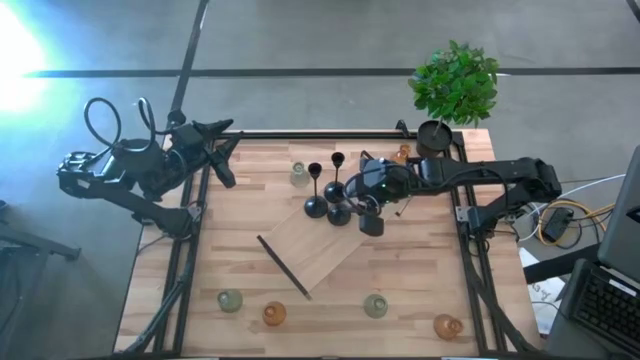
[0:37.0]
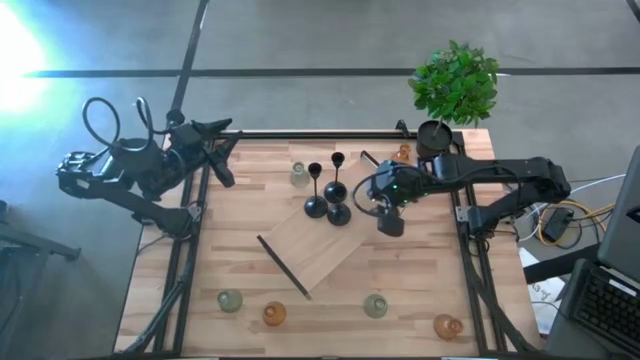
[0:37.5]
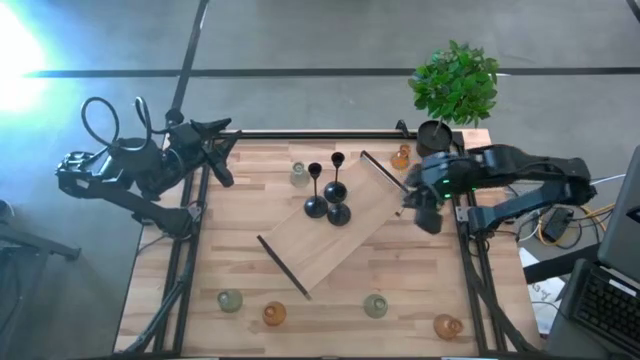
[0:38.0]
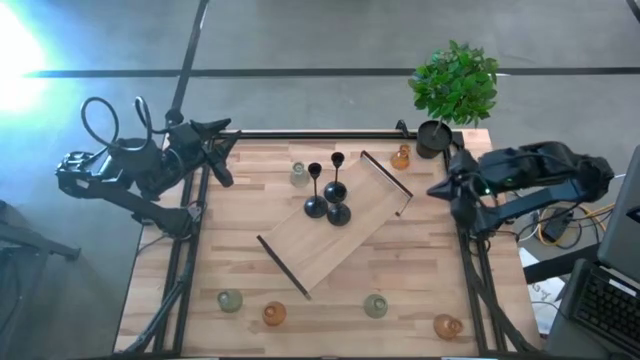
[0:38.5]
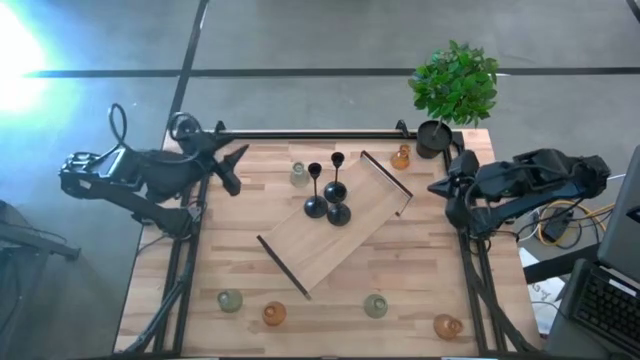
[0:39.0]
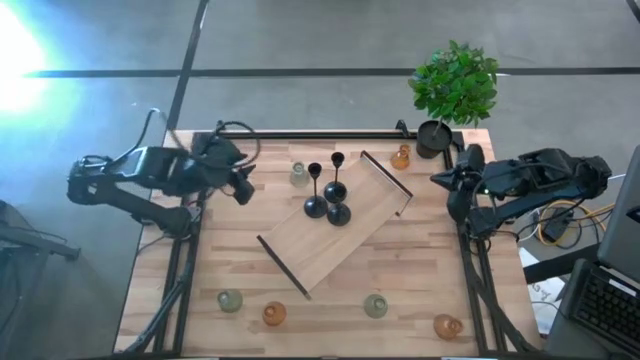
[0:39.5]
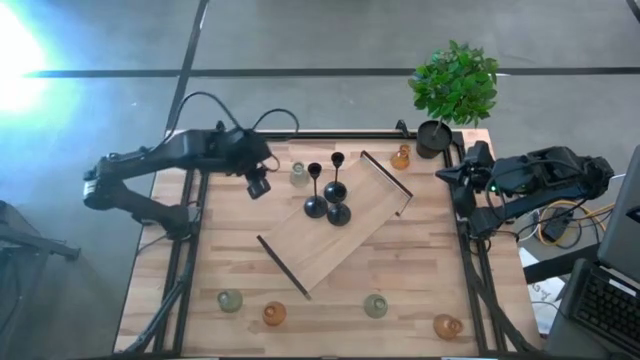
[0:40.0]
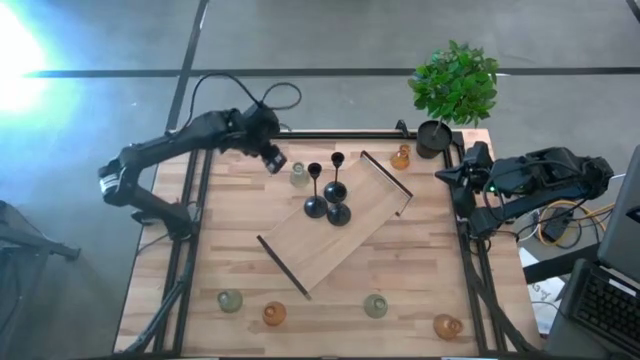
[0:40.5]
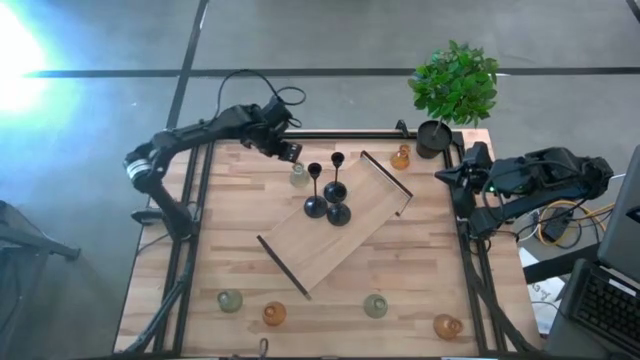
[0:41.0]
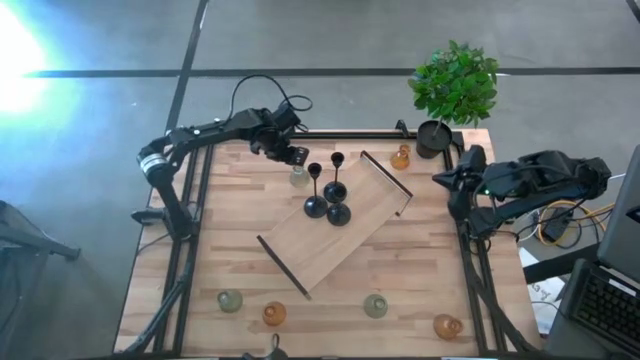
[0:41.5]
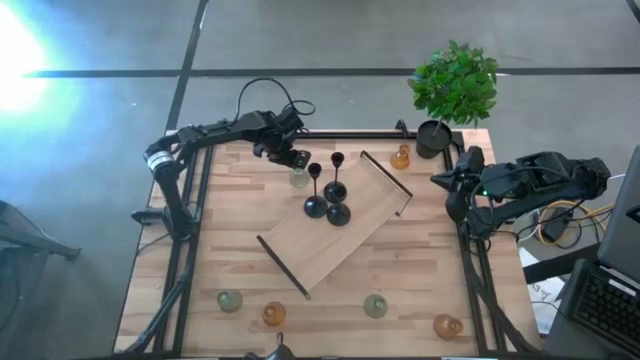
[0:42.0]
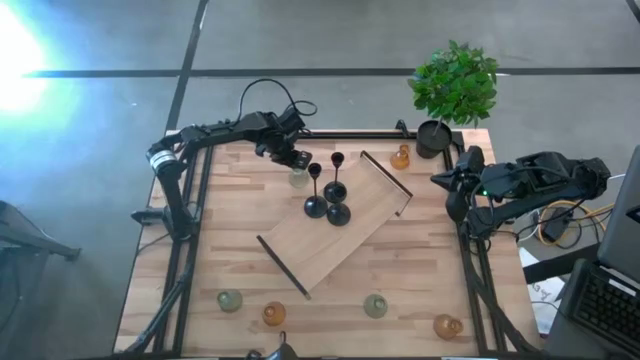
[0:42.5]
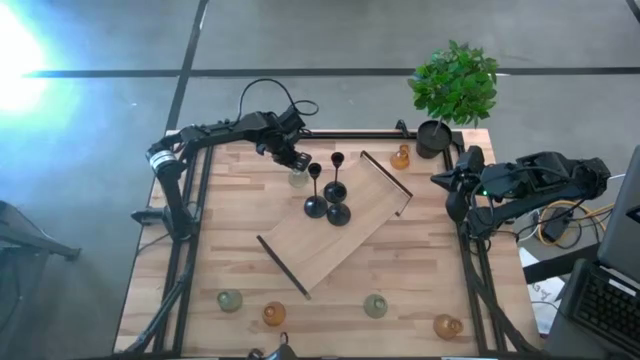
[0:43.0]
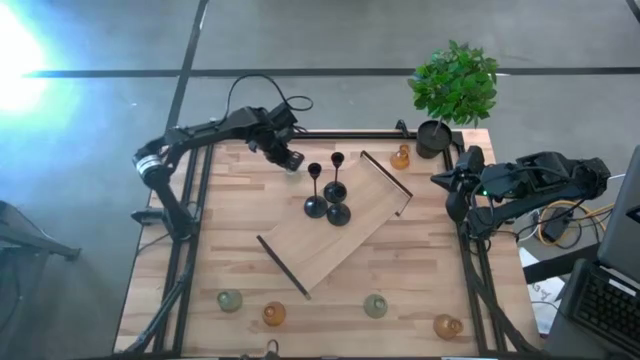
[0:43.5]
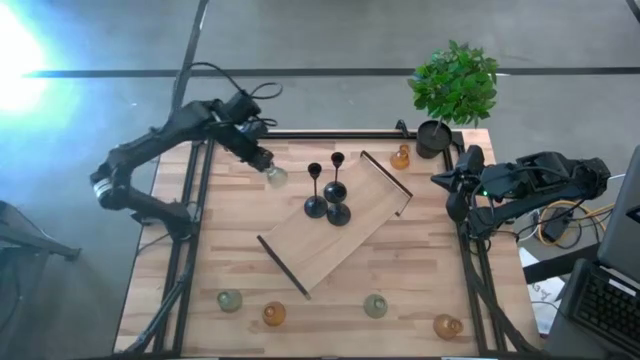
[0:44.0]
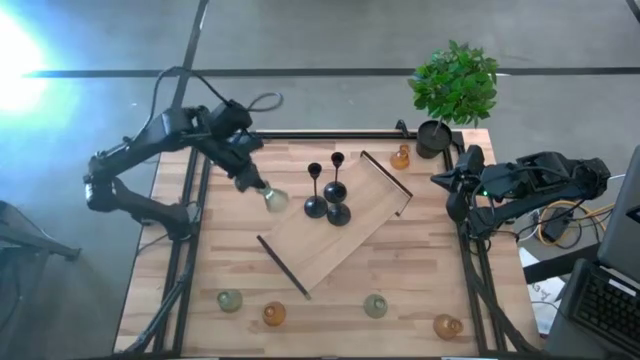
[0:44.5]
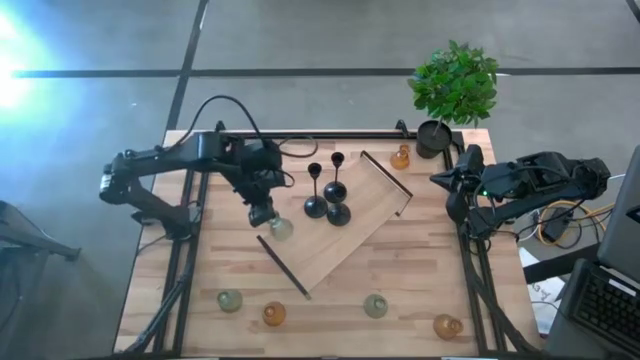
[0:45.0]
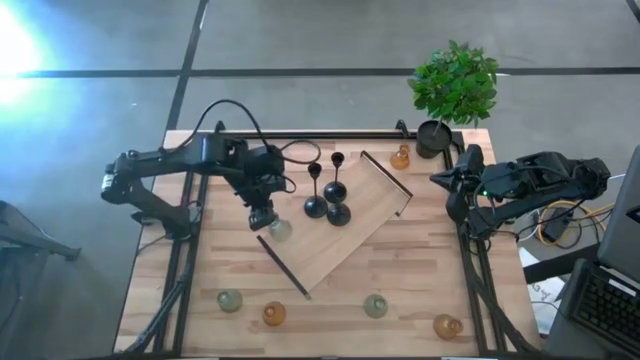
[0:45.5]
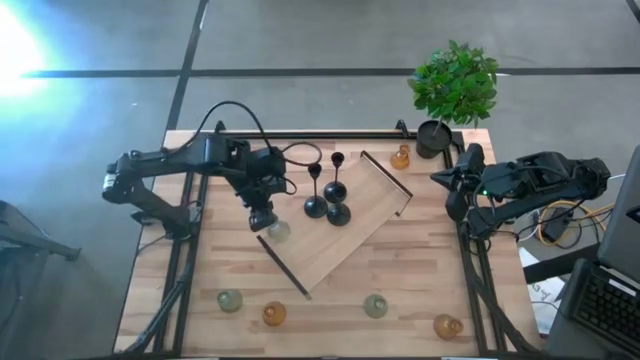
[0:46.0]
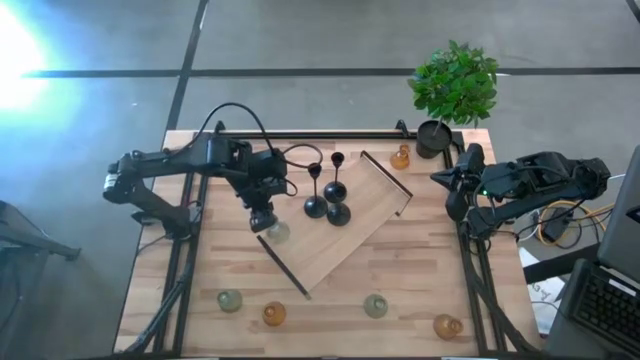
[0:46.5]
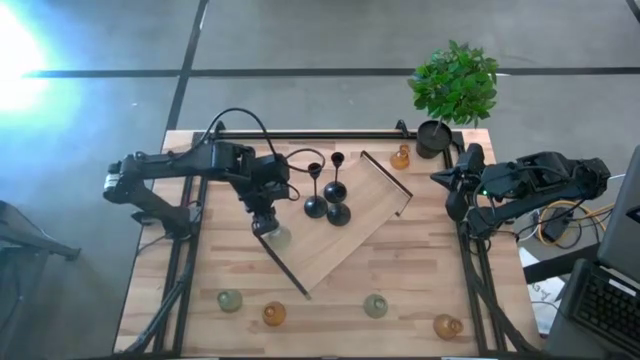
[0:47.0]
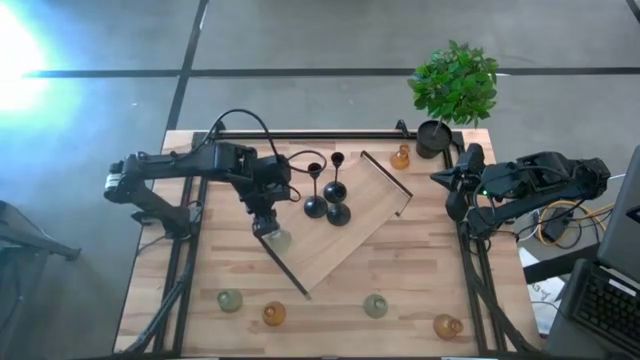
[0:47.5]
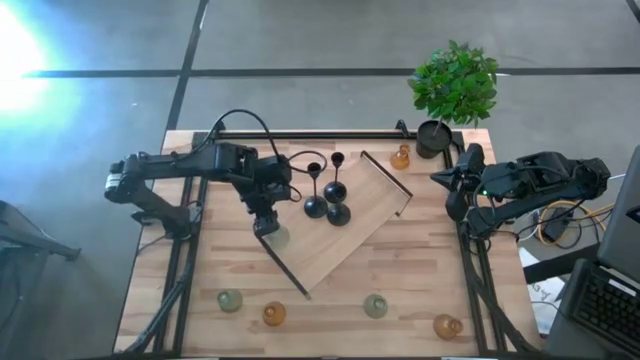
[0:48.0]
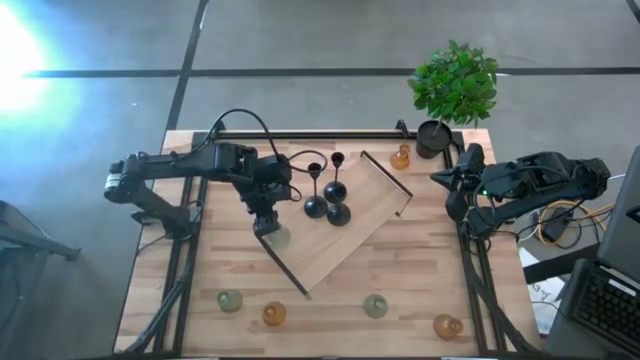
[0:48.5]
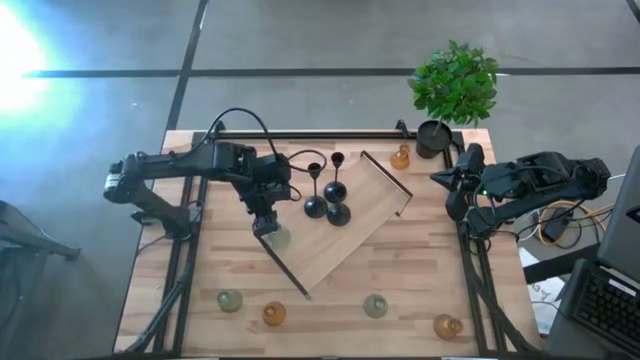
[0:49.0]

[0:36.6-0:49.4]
Task: Pick & Place candle stick holders
Put the top green candle holder on the shelf

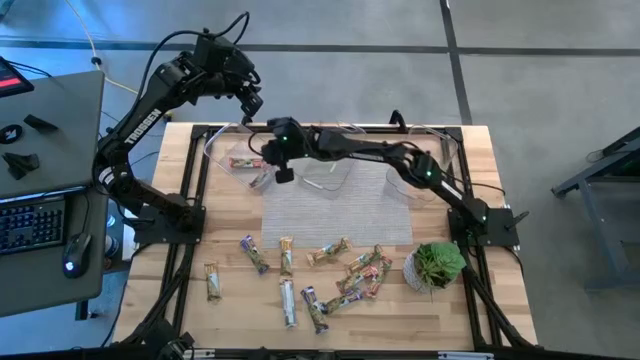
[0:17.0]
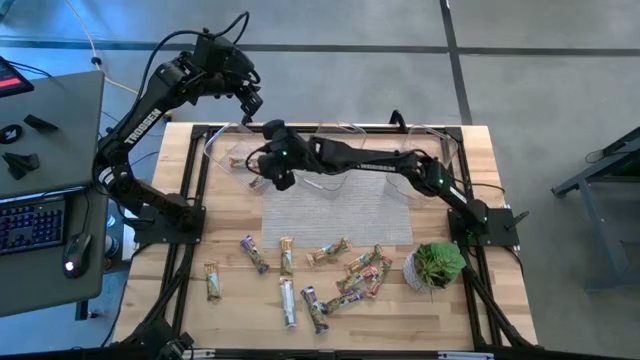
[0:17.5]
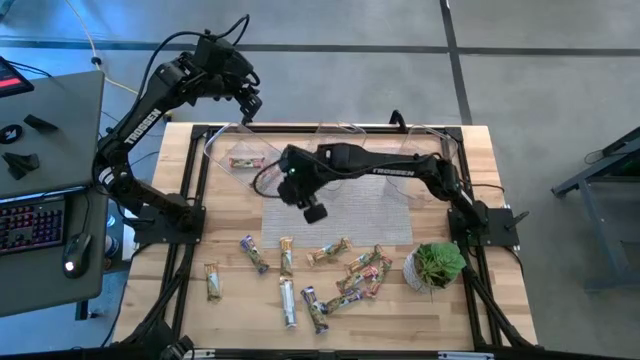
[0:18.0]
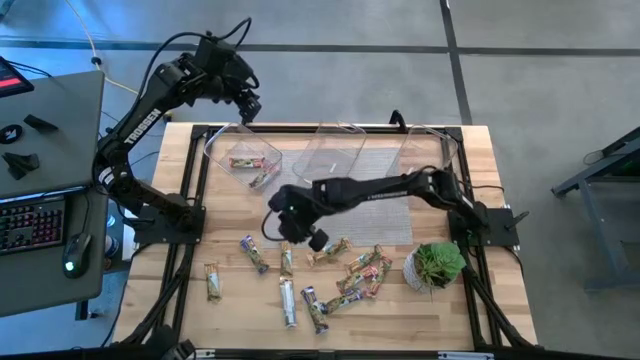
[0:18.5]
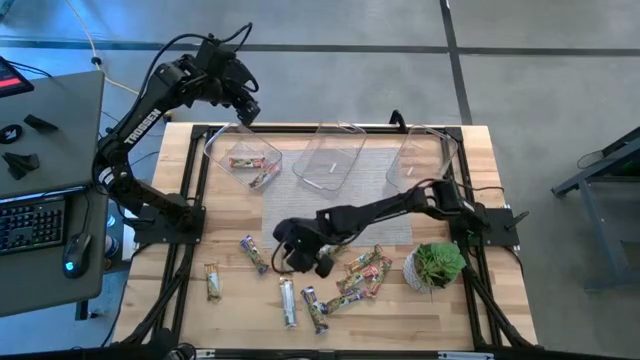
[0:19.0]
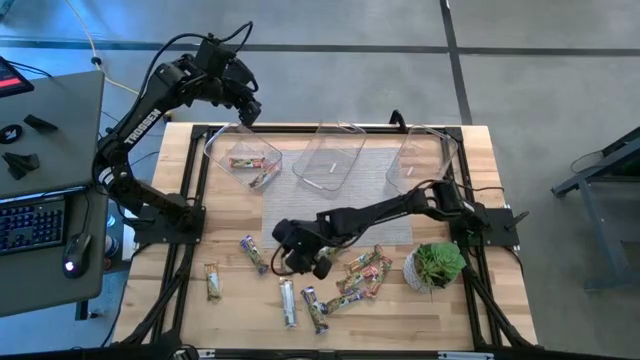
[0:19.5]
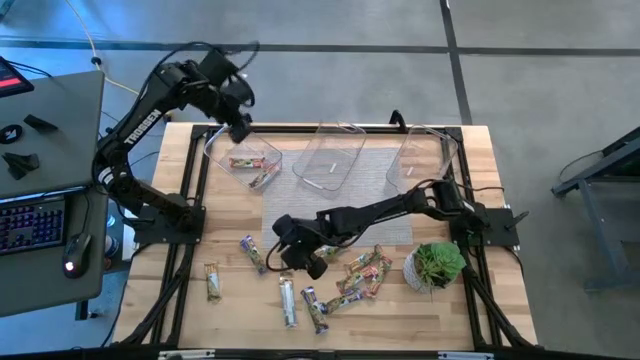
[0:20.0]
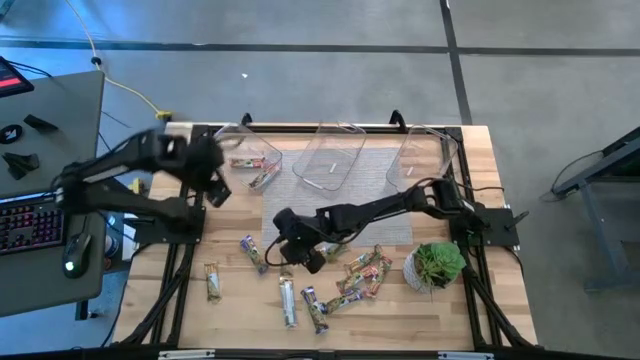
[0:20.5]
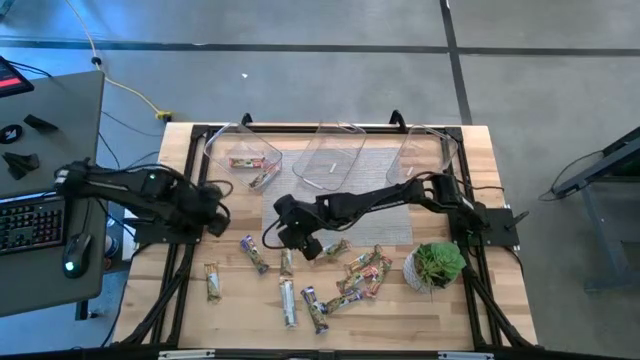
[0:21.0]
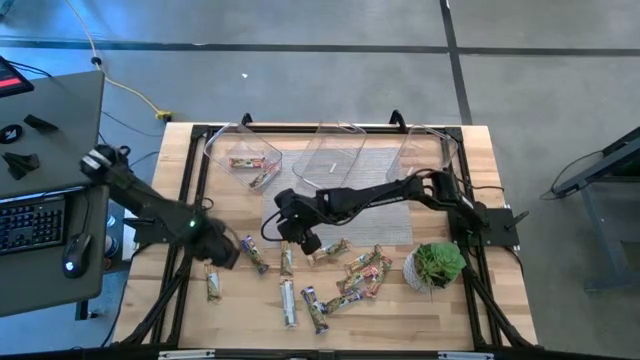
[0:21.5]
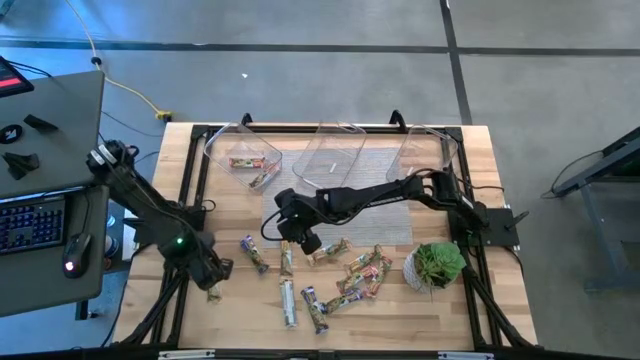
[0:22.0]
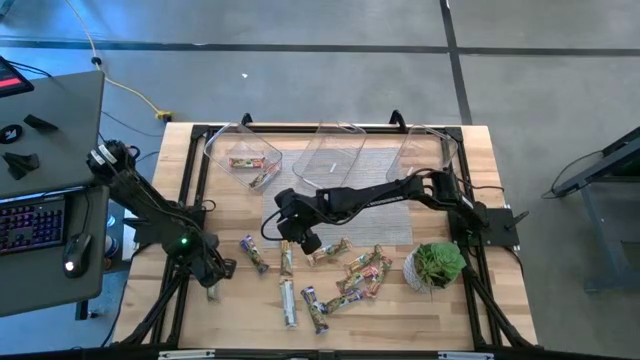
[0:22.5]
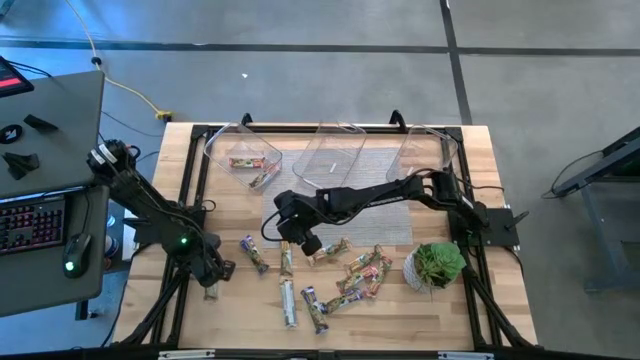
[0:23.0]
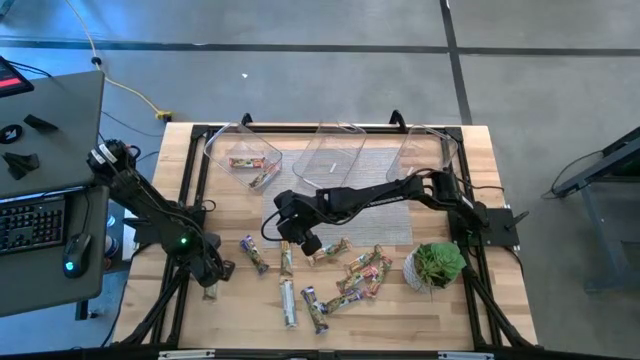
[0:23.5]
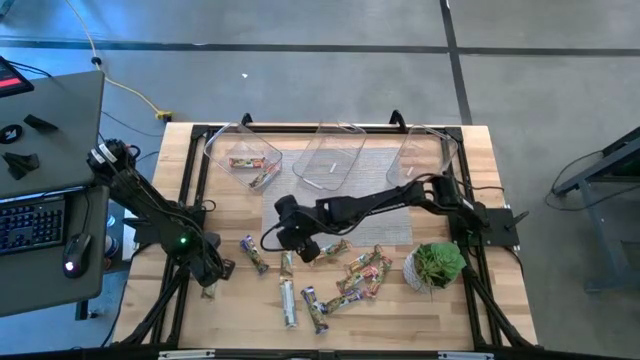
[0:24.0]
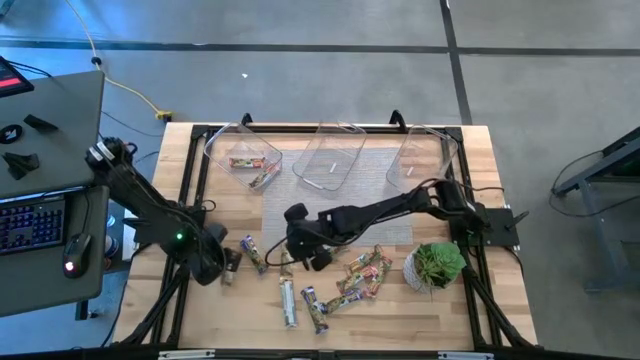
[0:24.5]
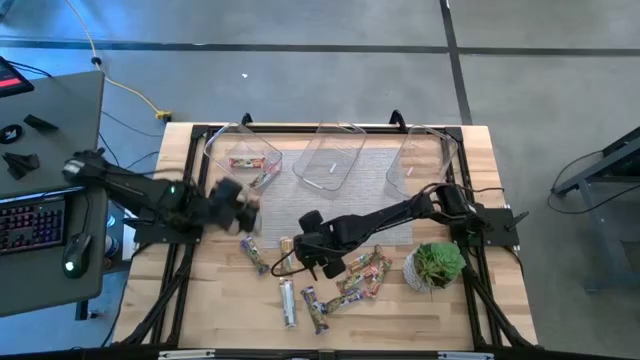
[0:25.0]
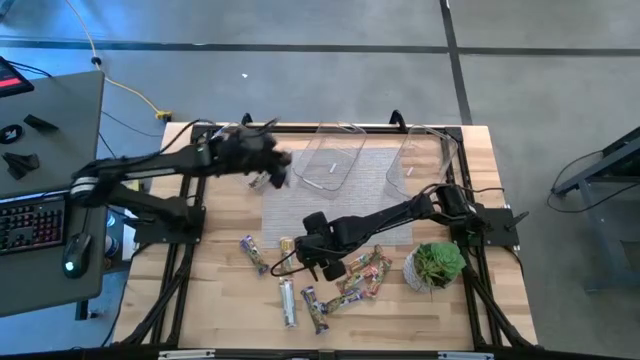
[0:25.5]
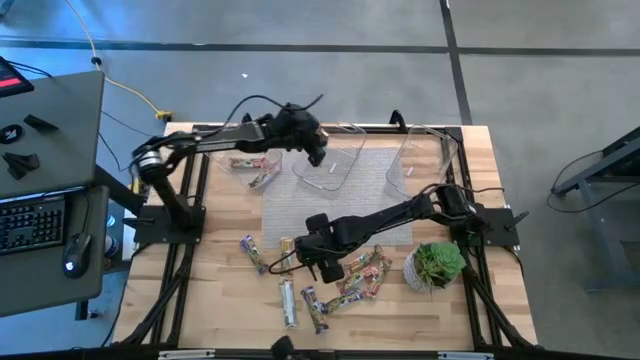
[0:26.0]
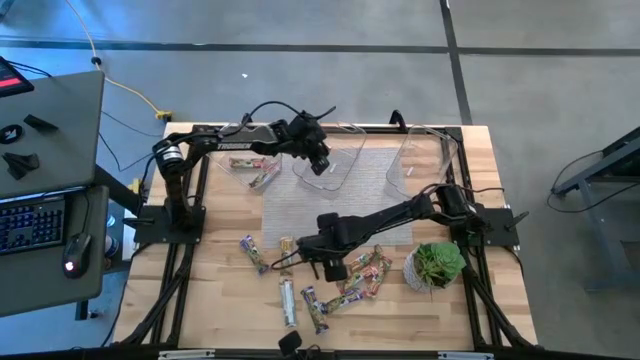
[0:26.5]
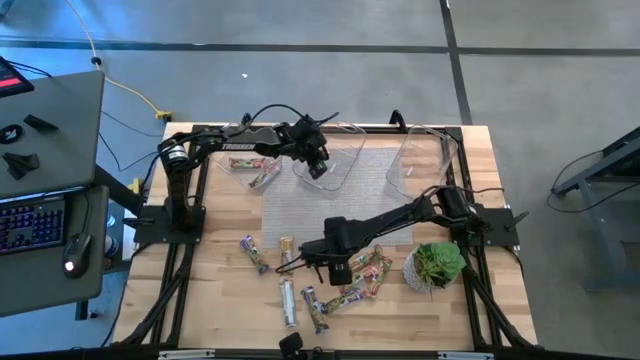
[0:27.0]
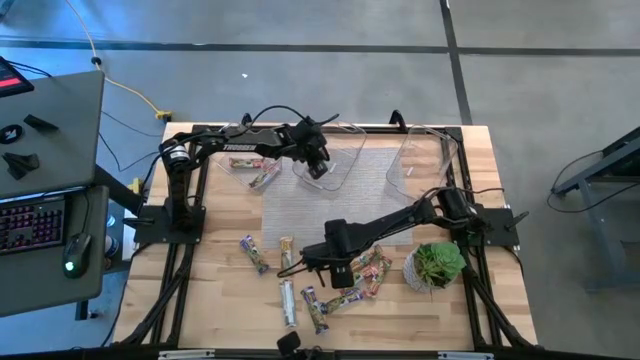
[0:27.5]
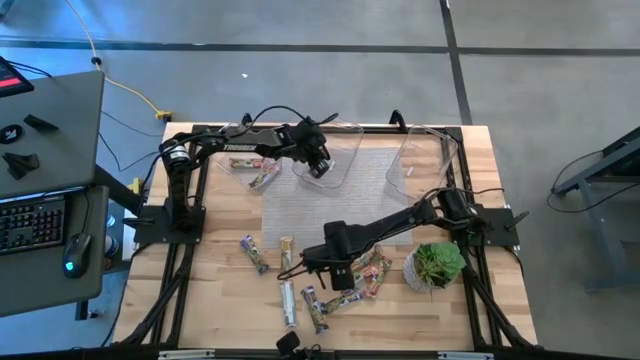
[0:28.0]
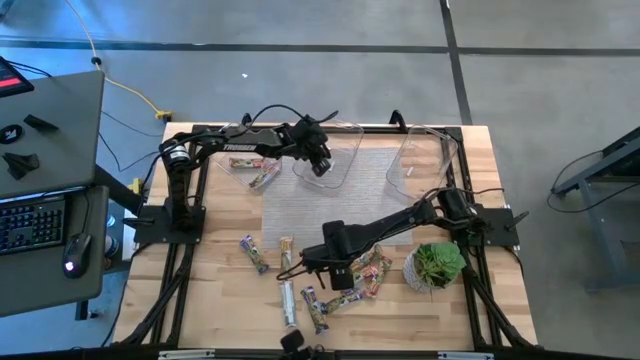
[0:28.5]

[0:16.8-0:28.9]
Task: Pick and place Granola Bars by type
Put the yellow granola bar into the middle transparent bin
